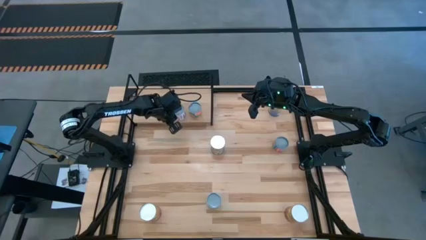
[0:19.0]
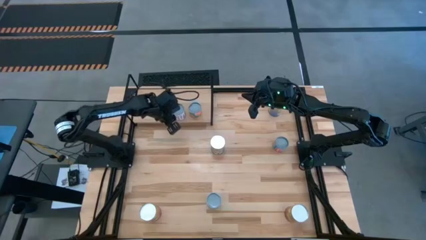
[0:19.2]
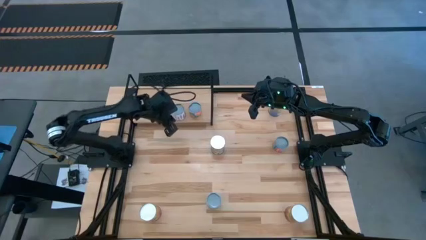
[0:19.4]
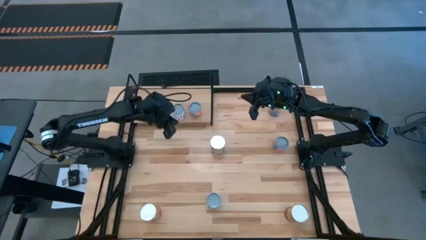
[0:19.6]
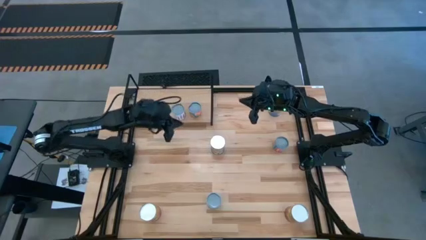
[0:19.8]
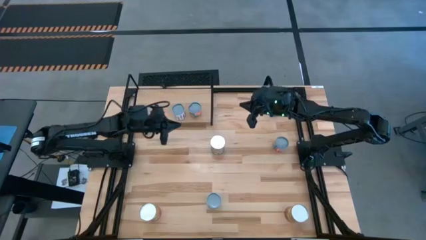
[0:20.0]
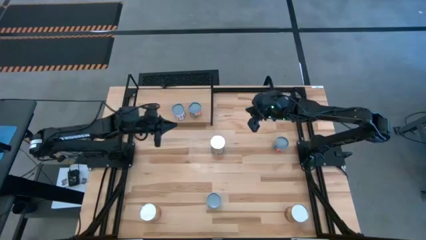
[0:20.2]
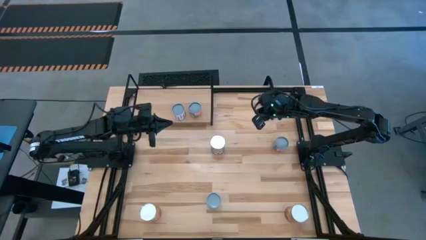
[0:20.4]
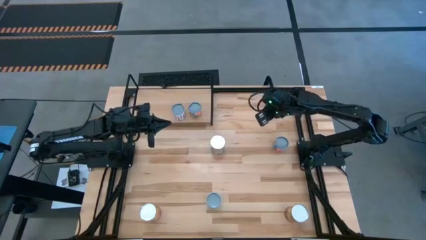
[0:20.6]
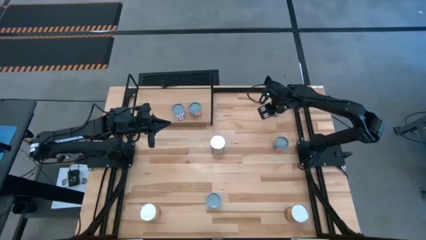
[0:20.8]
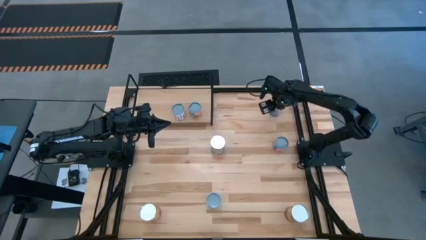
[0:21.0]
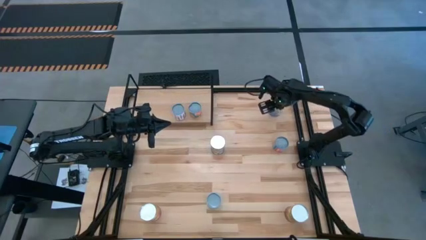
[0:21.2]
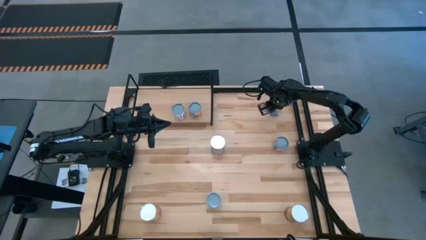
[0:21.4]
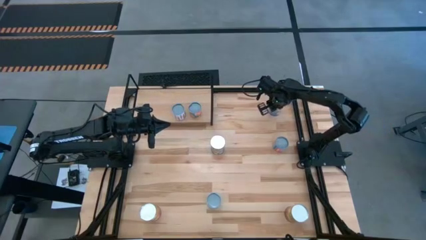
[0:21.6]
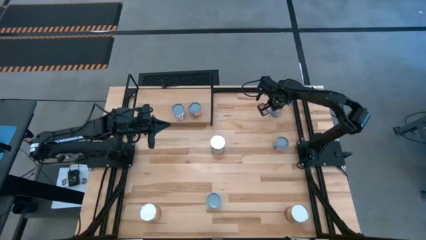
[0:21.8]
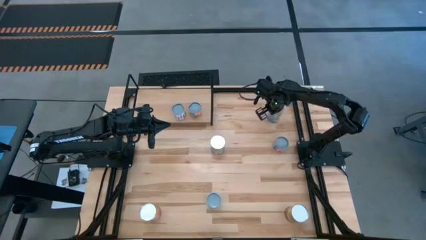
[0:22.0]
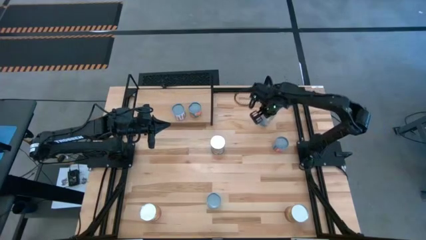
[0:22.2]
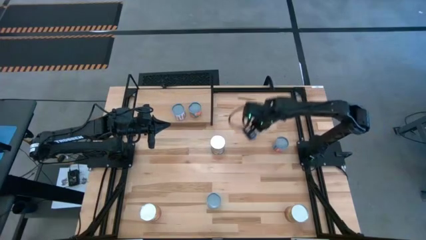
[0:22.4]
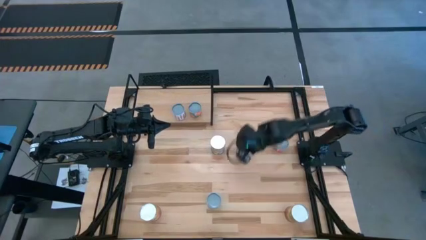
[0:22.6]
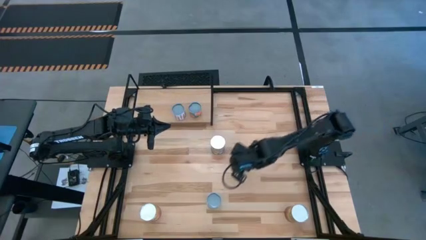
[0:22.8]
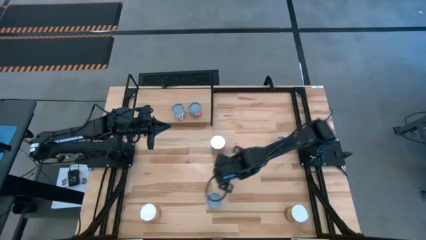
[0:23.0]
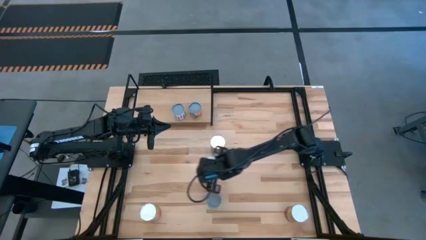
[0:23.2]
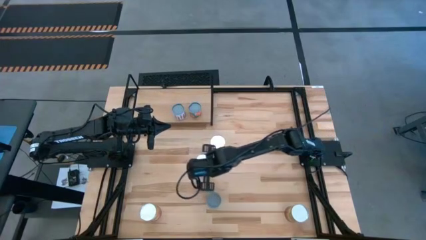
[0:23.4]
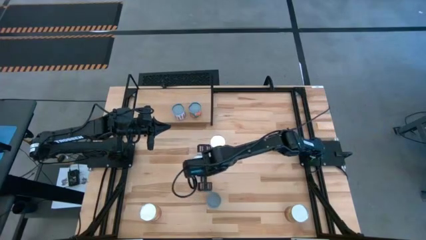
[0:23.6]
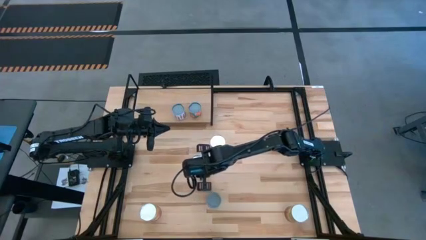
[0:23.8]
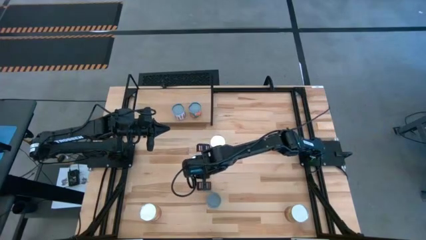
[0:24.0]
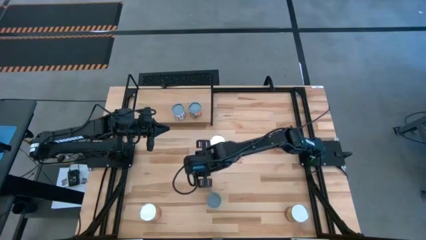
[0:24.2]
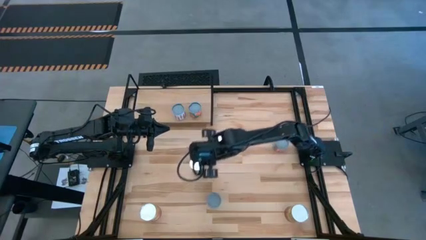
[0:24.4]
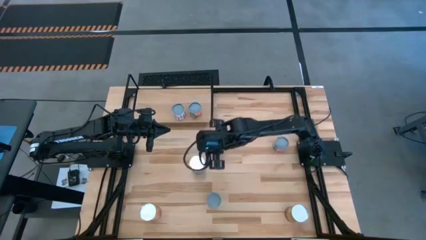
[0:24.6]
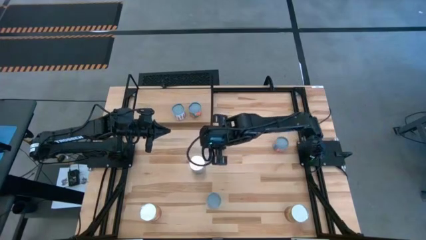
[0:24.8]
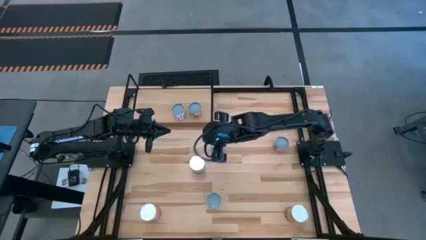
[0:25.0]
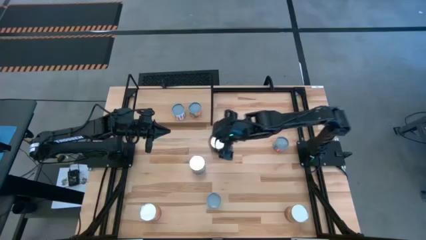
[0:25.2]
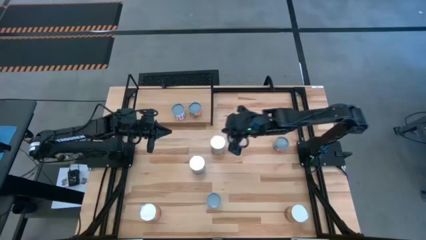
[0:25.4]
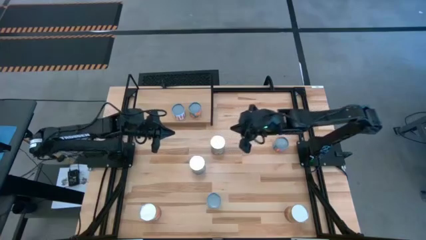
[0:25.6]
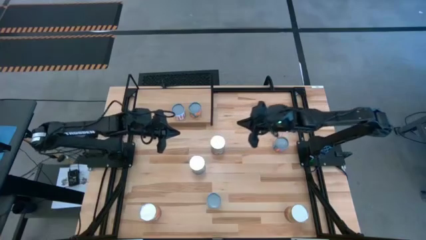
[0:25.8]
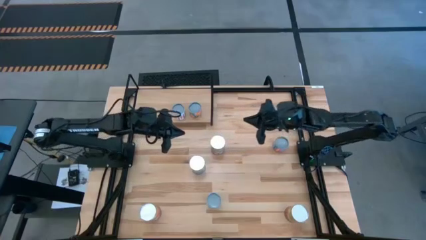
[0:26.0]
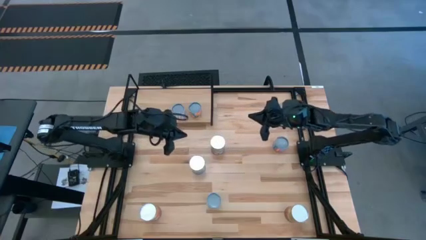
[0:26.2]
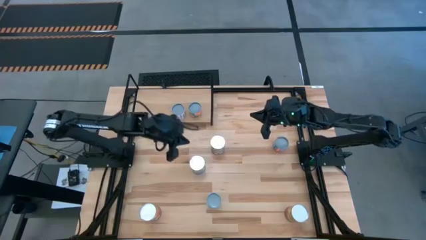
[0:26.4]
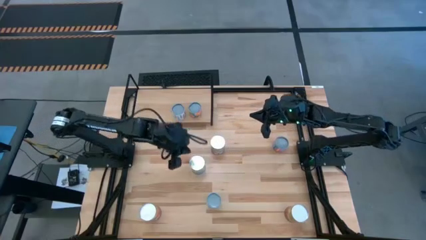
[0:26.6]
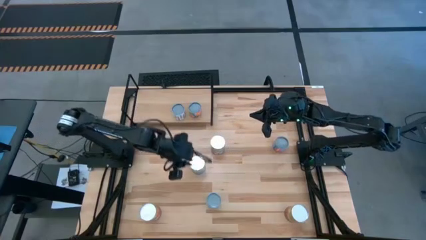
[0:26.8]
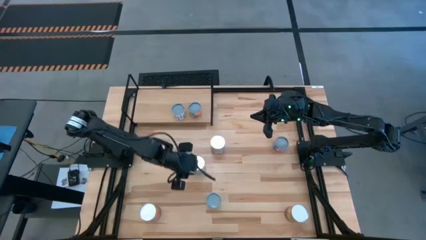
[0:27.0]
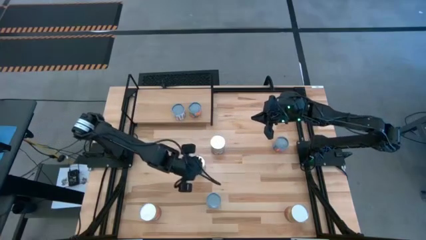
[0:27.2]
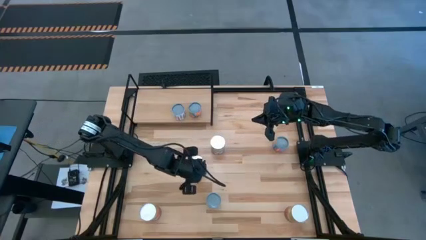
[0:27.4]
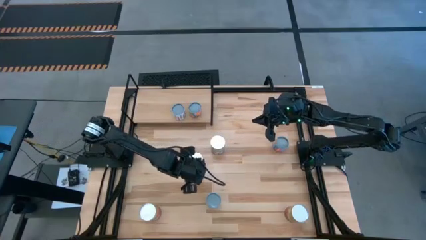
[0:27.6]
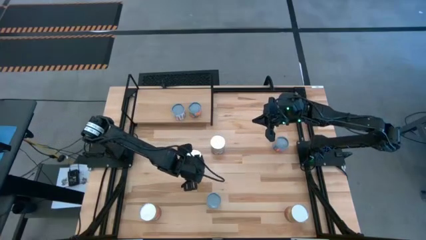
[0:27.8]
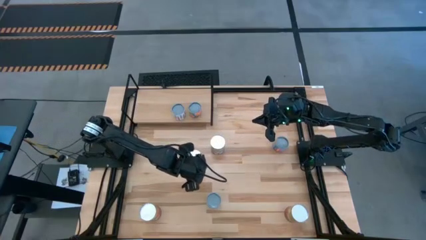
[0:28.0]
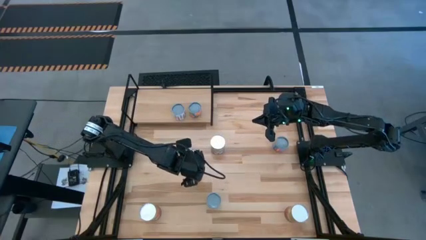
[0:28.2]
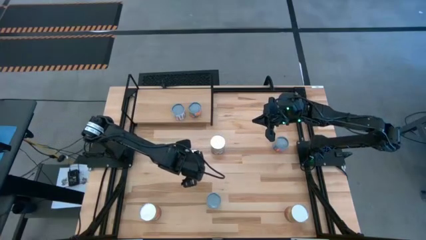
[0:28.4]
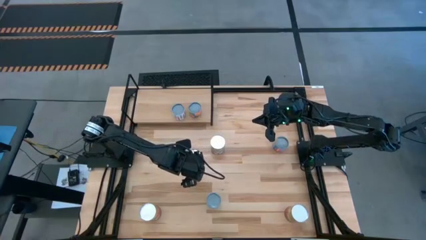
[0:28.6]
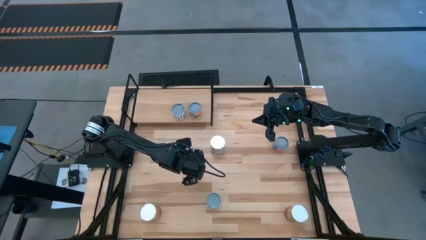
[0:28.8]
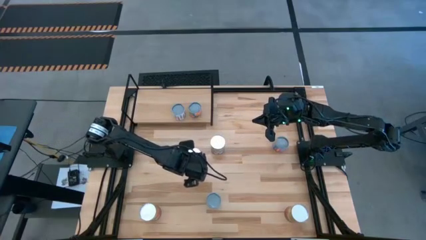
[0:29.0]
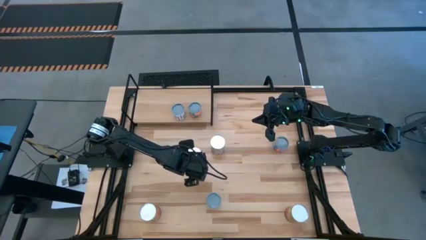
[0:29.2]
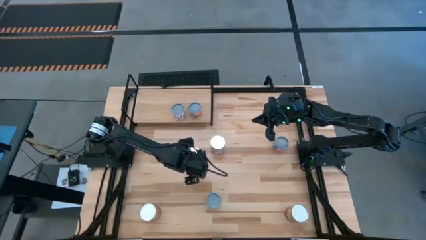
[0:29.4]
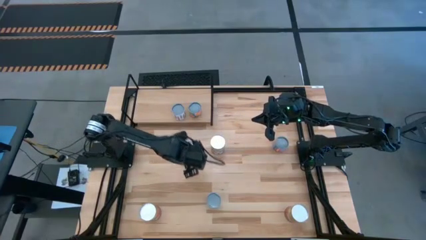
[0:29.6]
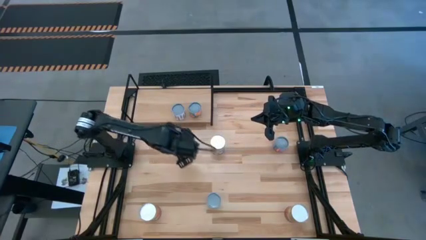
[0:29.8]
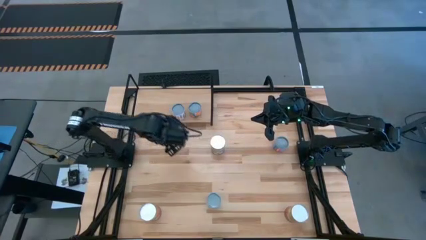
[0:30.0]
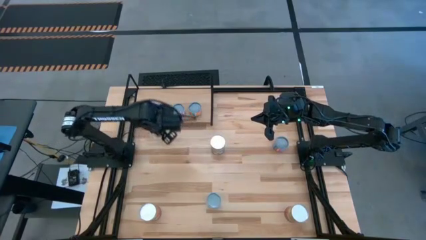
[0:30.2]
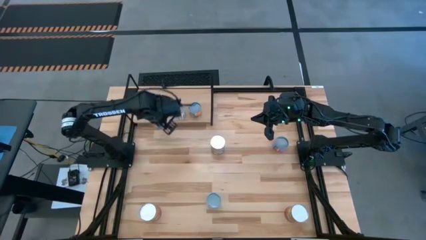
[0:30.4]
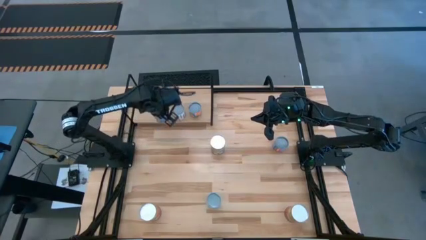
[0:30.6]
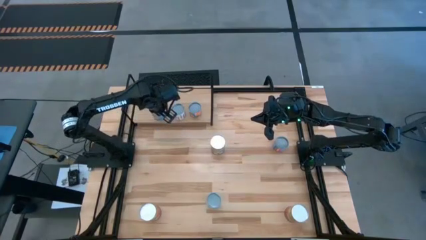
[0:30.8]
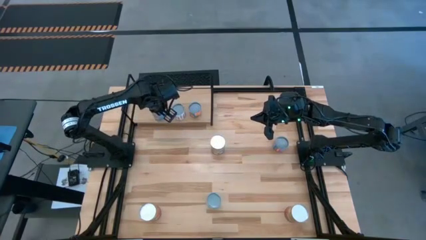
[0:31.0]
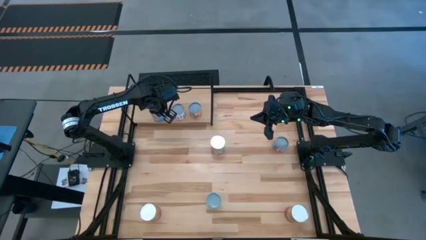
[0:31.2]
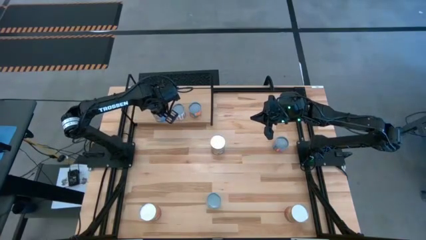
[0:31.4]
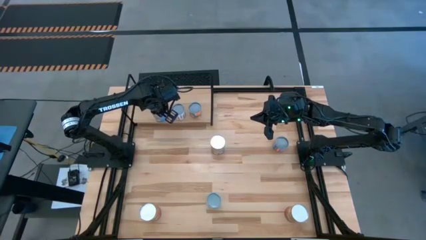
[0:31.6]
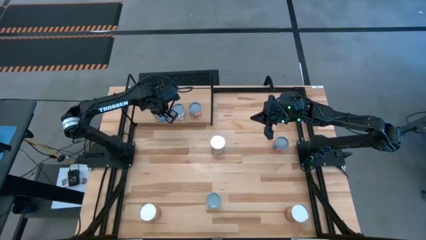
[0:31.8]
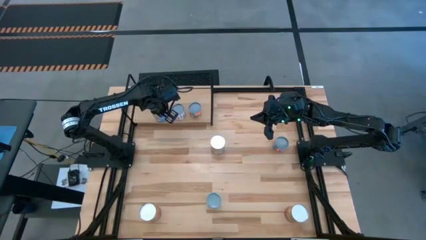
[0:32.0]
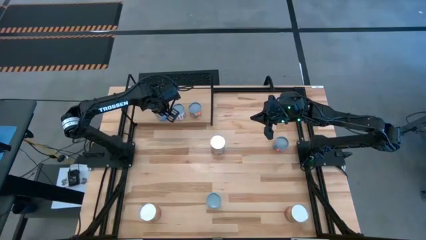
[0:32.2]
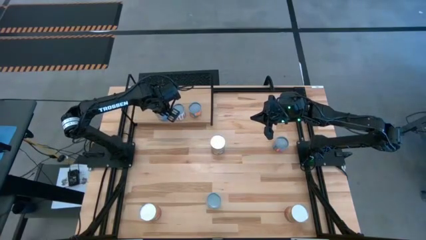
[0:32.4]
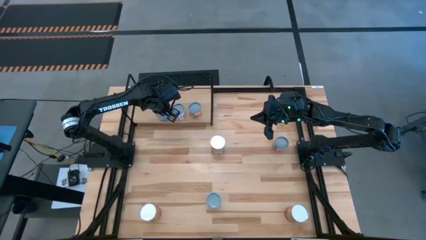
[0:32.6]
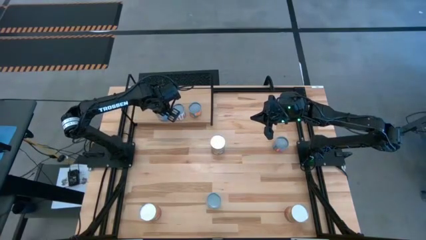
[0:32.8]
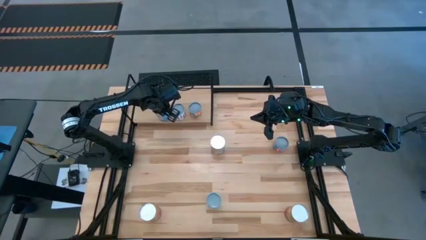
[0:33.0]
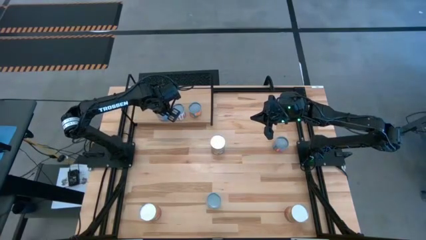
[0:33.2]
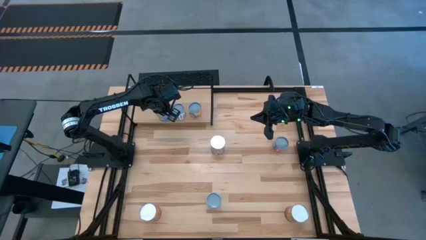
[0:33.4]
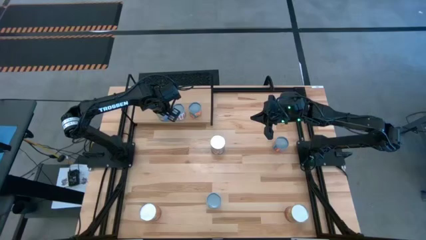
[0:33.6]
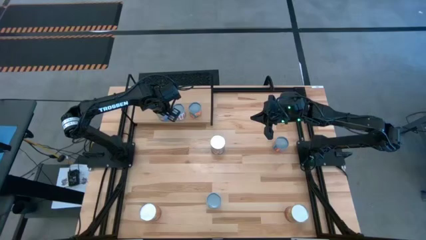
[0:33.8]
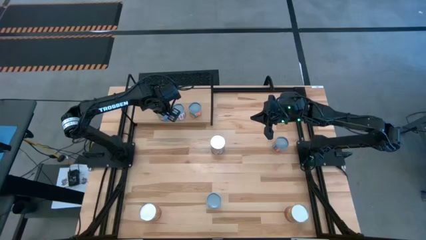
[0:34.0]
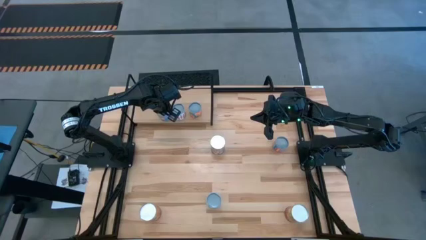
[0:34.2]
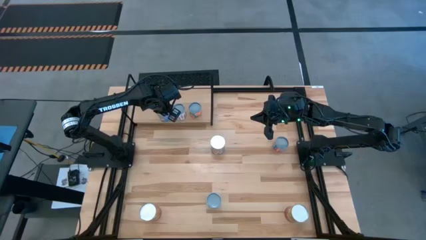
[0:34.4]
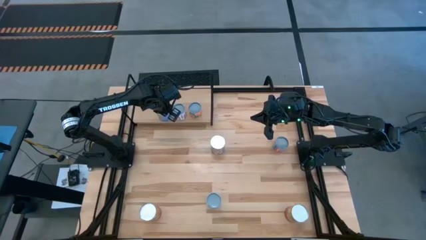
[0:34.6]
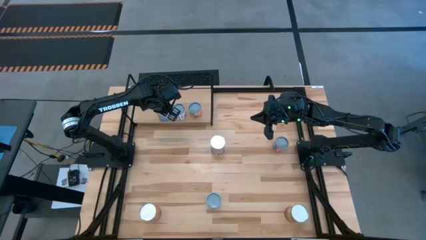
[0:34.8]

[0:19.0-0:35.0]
Task: Pick and place cans onto a shelf
Put the top large canned peaches on the shelf
